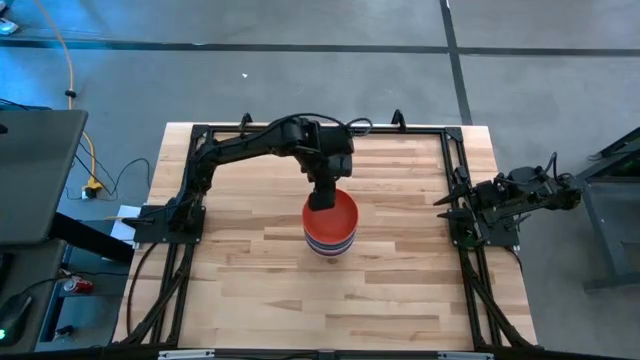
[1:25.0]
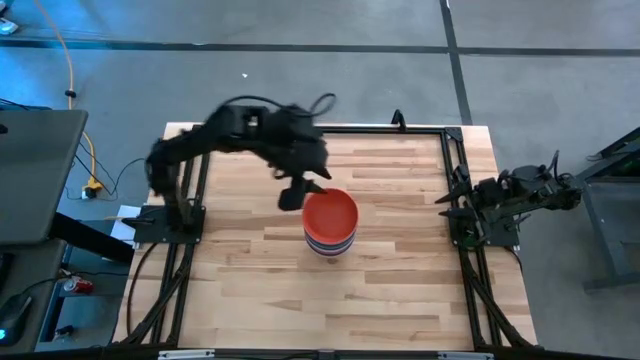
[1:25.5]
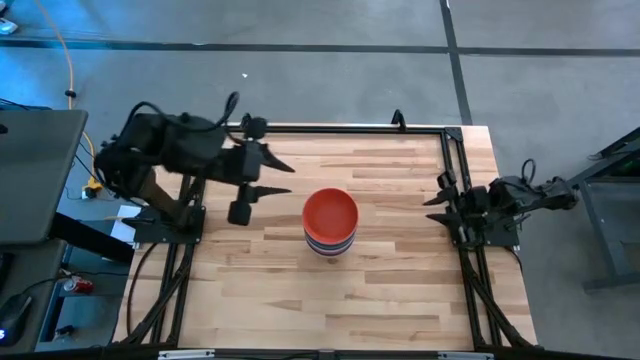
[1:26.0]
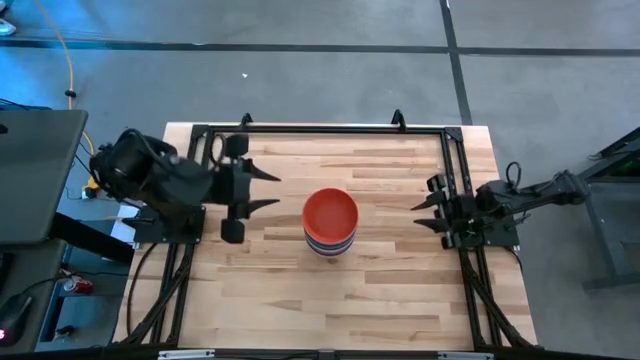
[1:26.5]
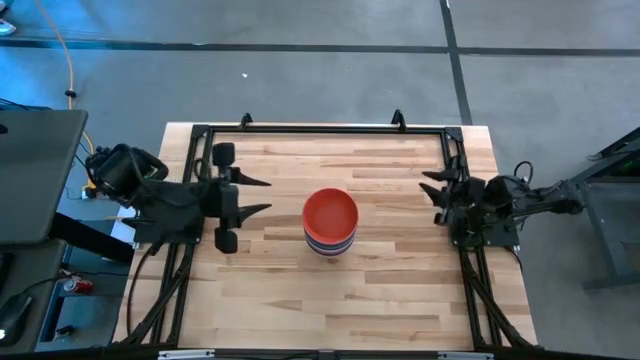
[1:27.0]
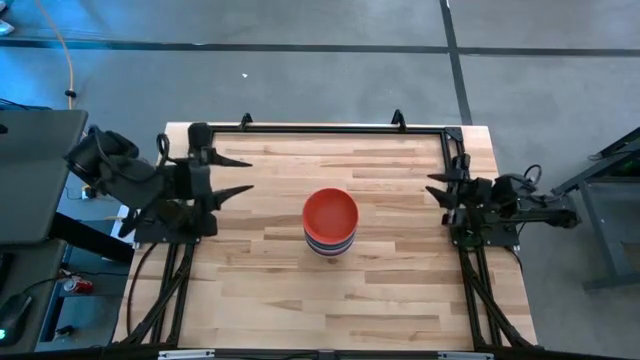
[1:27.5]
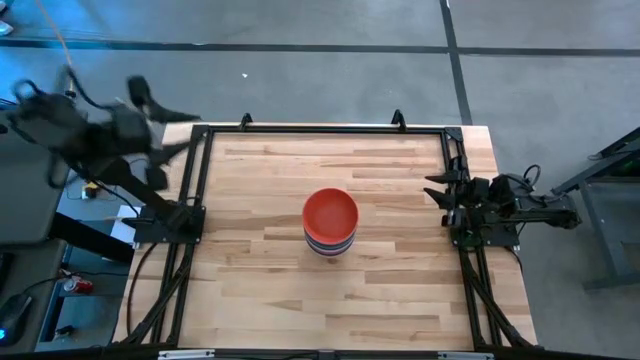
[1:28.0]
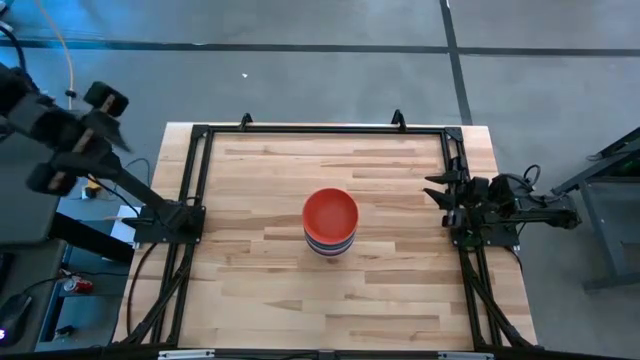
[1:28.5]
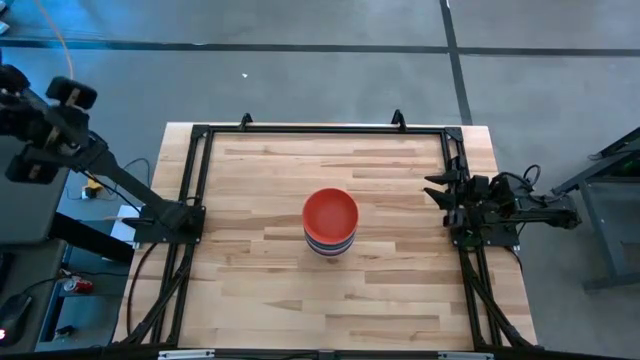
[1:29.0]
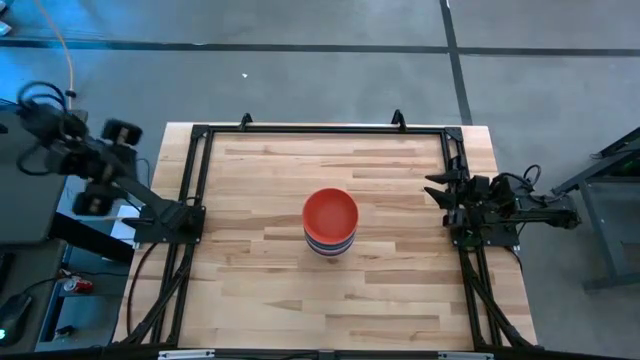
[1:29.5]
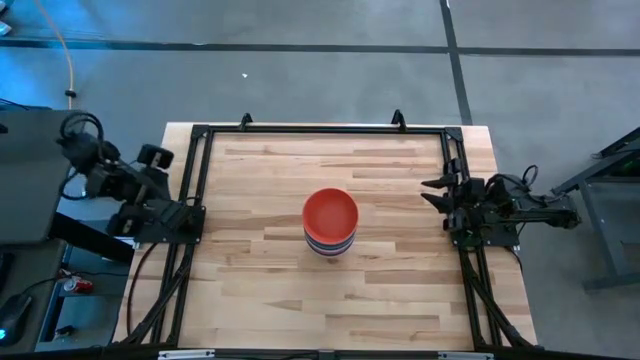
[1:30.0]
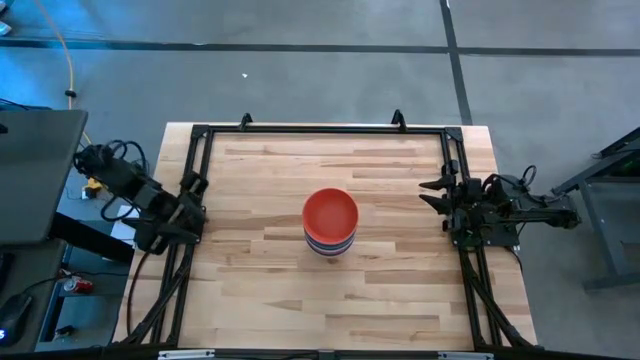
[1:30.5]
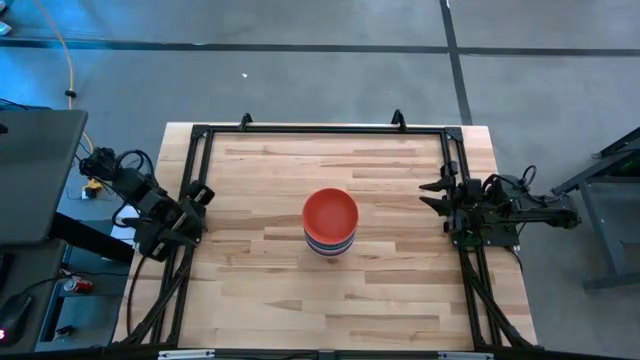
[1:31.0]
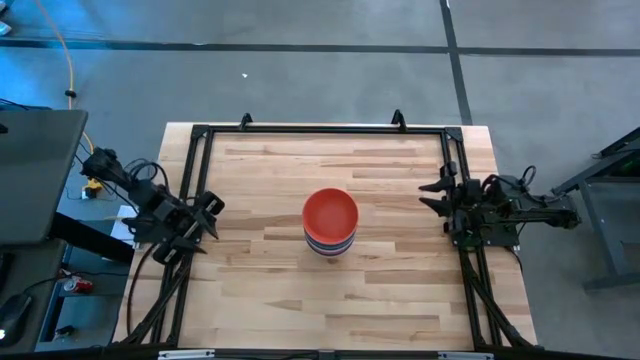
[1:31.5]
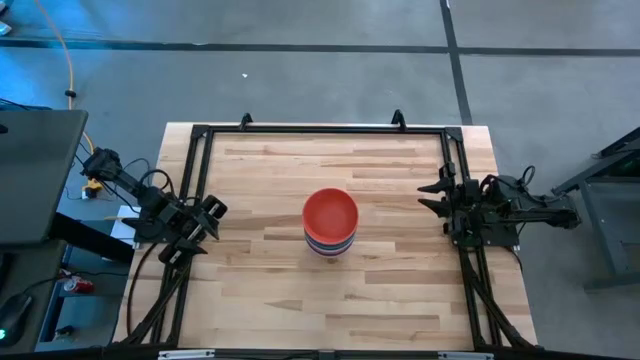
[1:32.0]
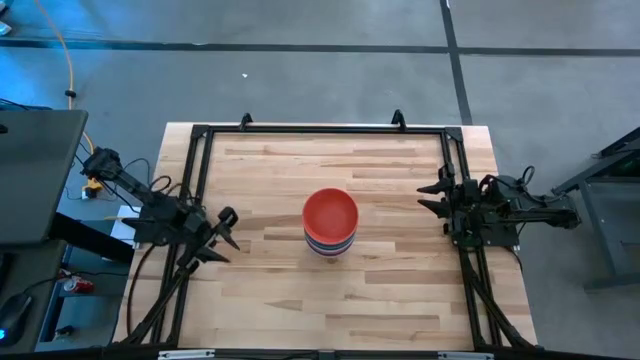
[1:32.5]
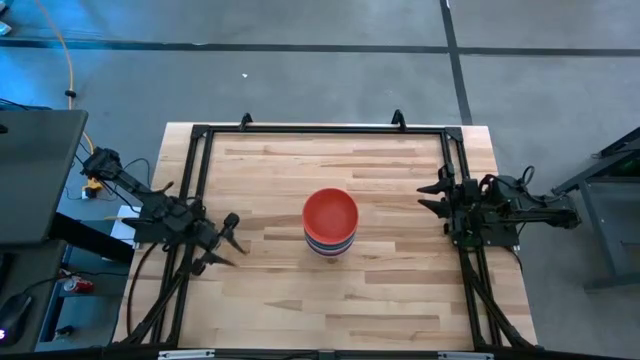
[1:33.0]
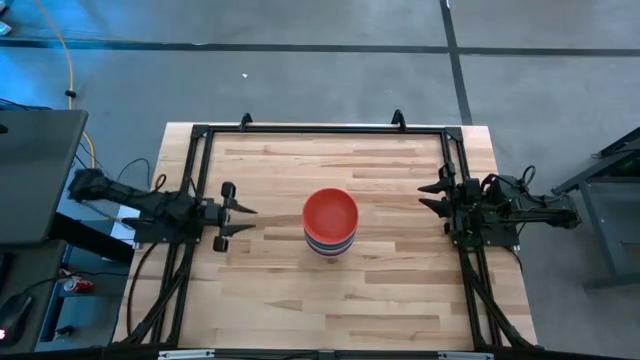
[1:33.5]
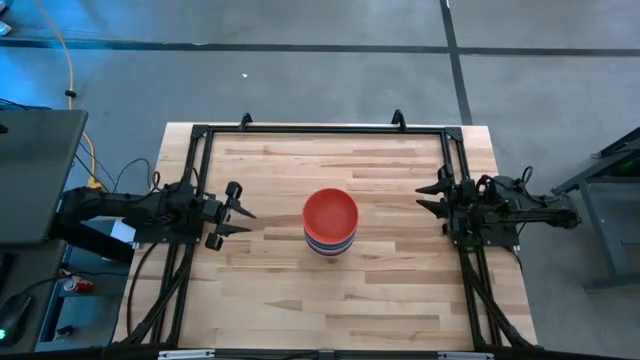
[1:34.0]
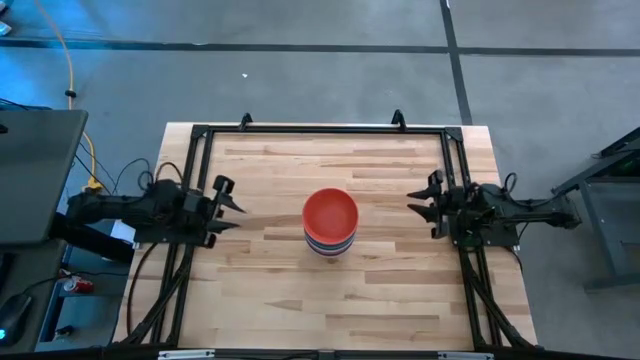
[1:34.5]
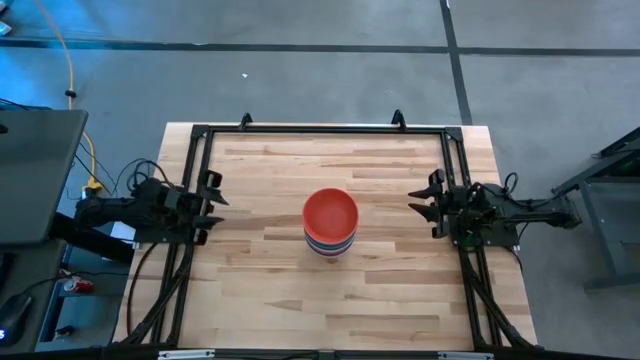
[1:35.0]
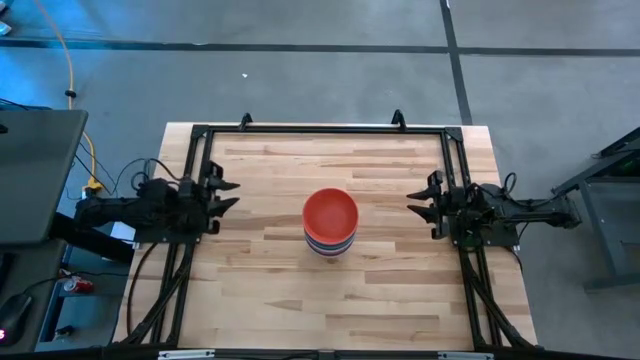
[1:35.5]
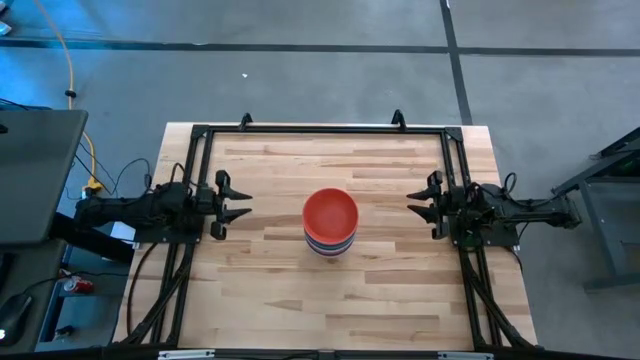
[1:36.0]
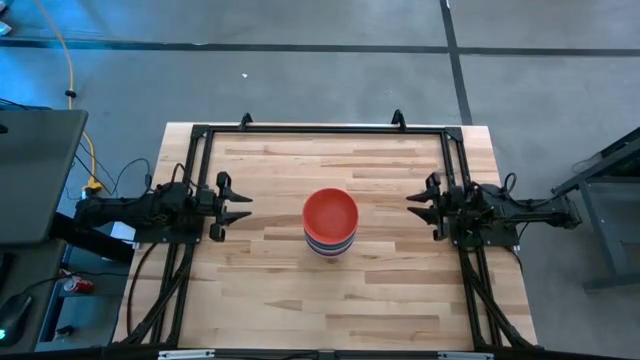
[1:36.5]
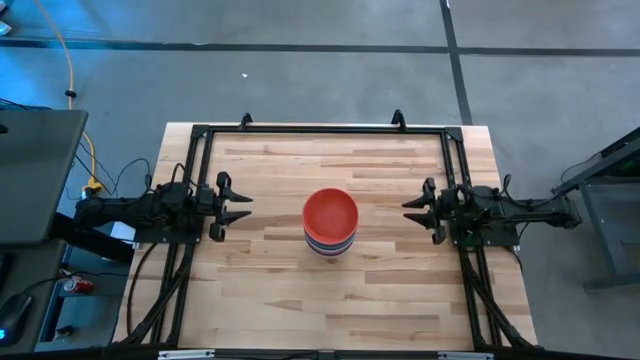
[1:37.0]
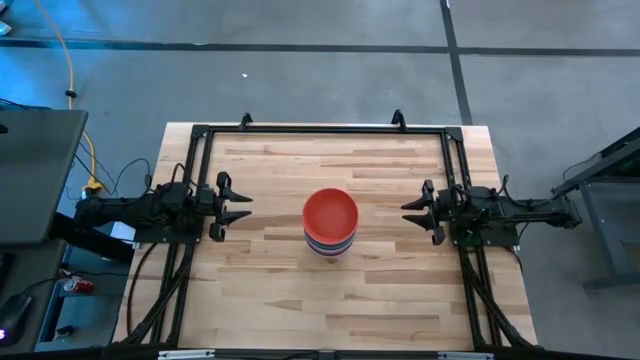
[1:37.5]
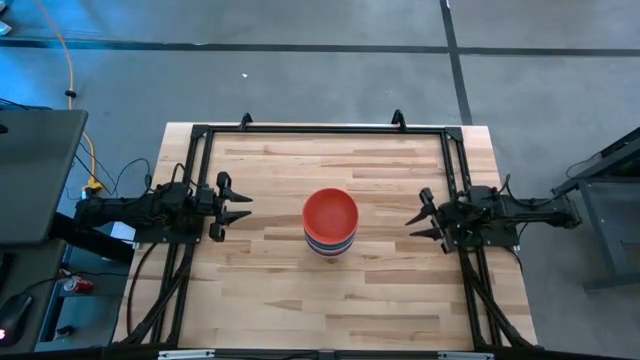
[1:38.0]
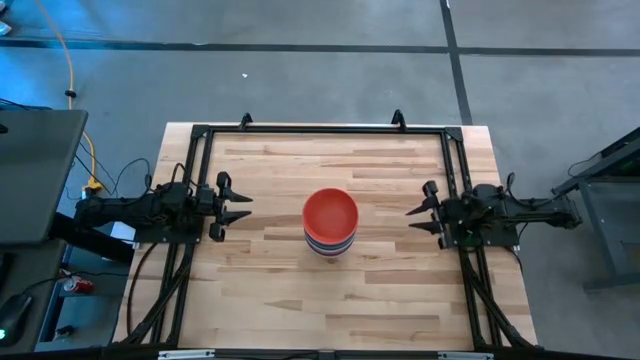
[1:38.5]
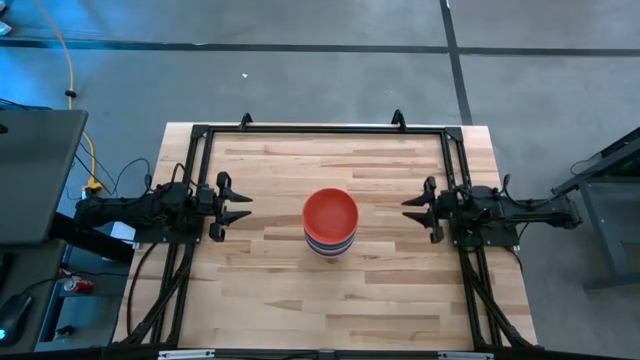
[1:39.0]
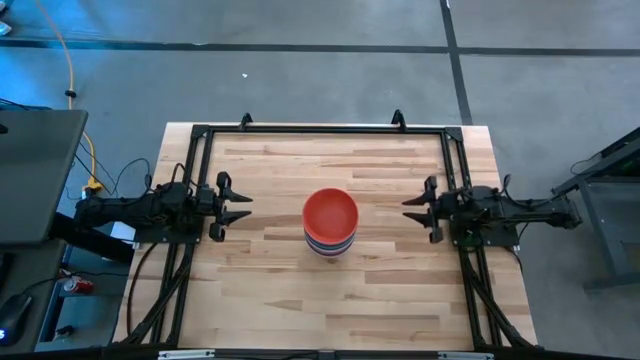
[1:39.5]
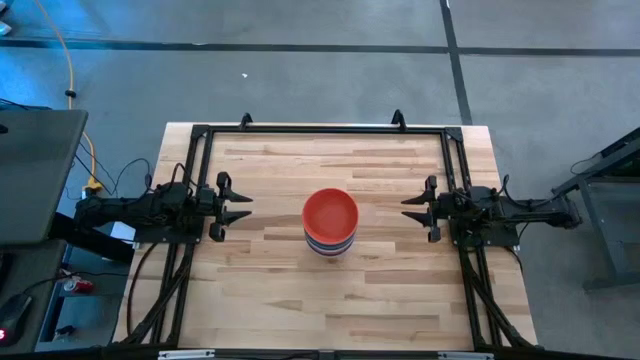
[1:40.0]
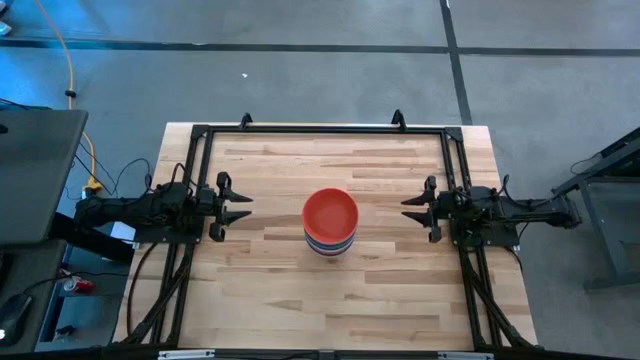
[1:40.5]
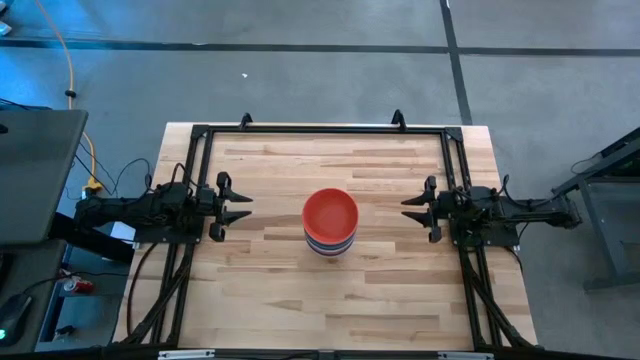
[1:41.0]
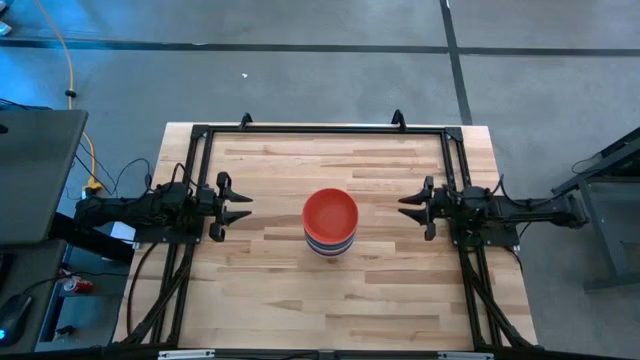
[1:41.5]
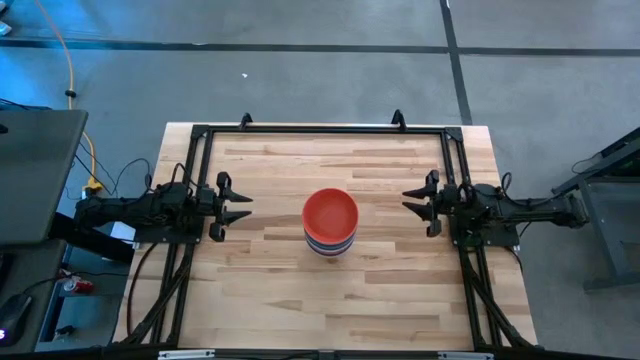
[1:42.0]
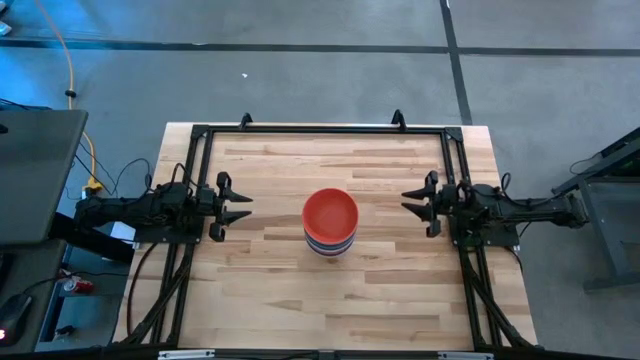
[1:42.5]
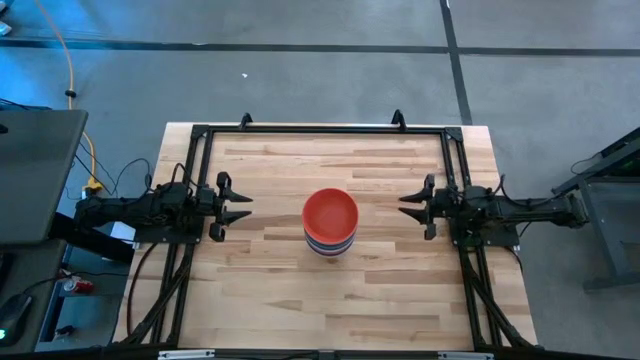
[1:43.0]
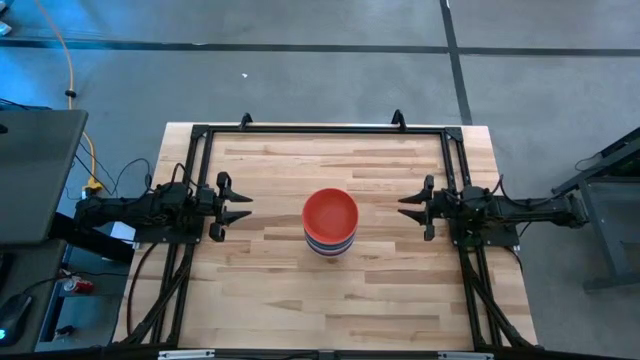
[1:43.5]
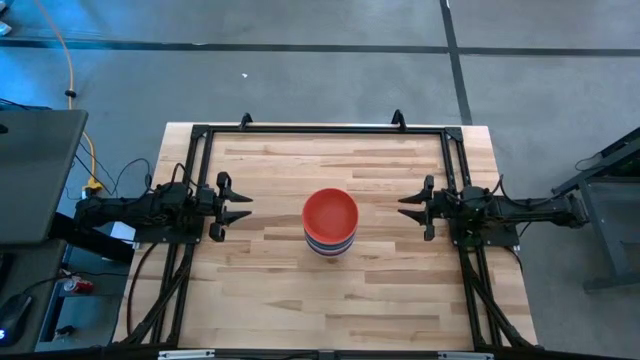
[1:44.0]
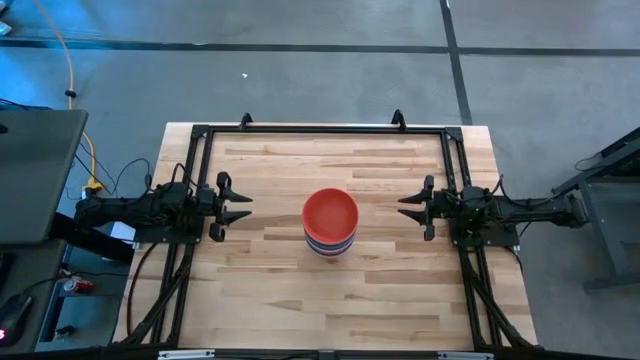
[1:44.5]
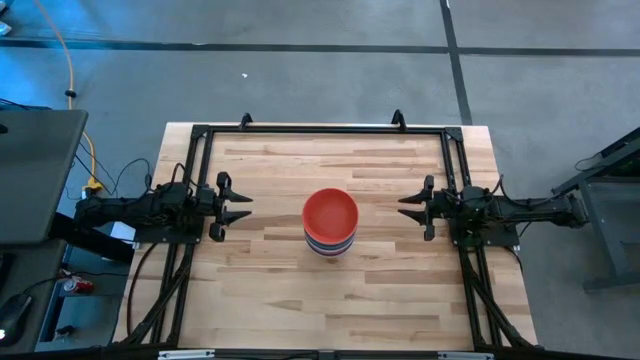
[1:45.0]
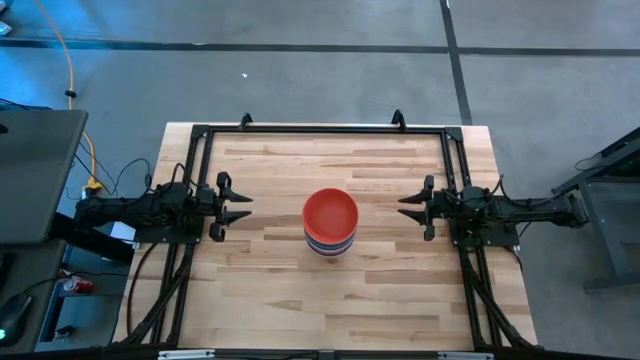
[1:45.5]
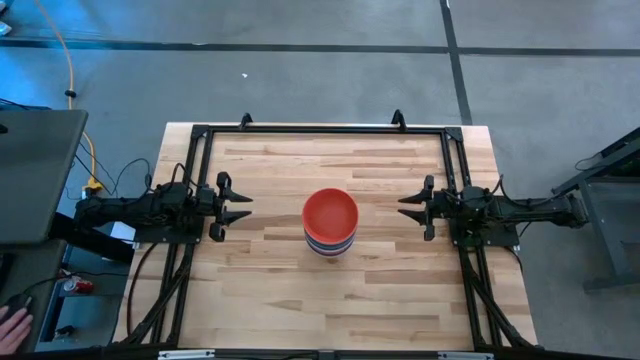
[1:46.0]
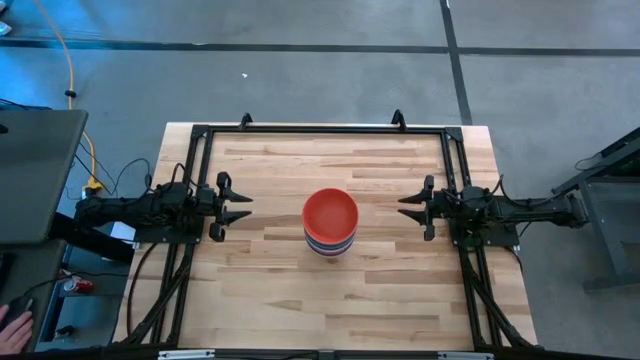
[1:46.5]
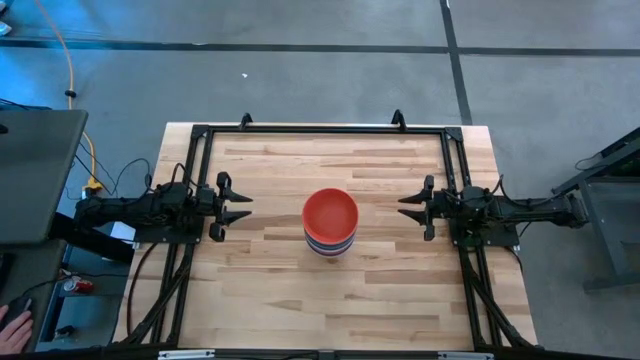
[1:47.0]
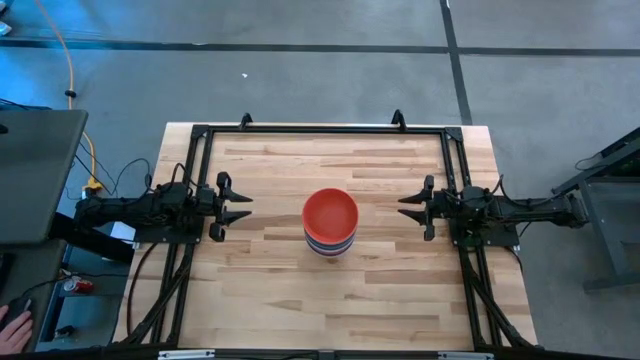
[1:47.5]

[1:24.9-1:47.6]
Task: Nest bowls inside each other
Return to Home Position
